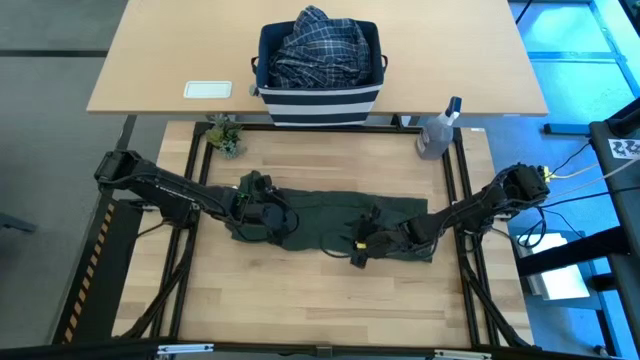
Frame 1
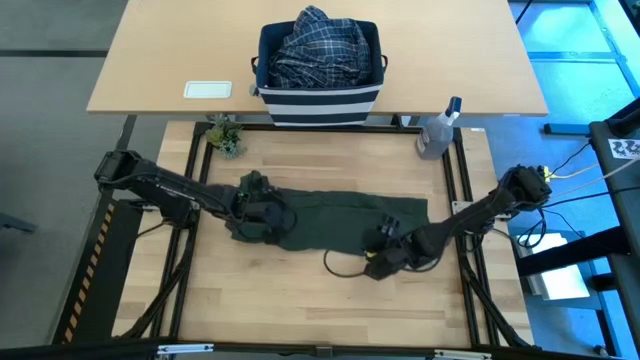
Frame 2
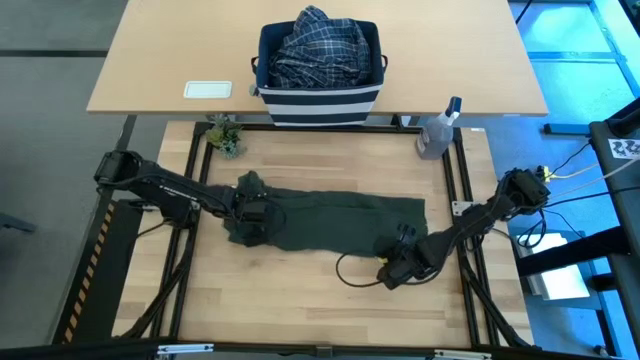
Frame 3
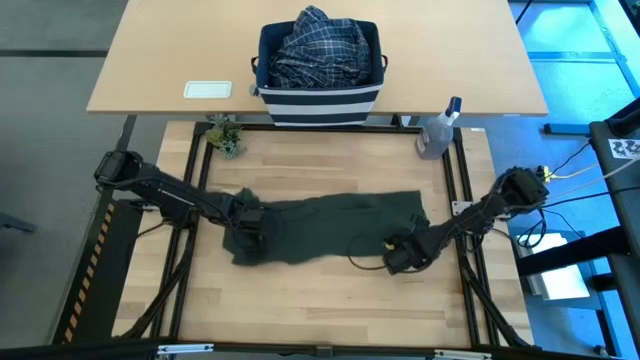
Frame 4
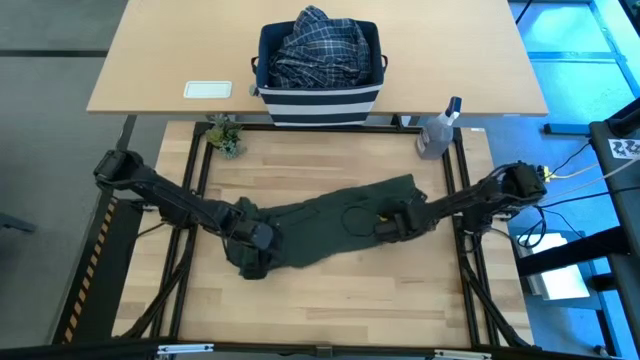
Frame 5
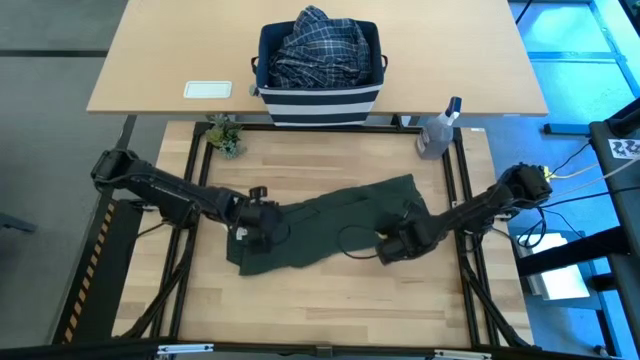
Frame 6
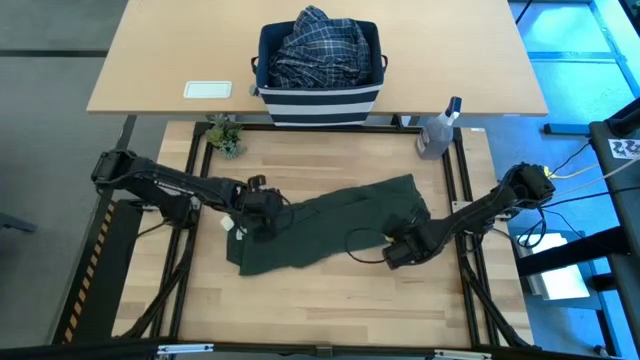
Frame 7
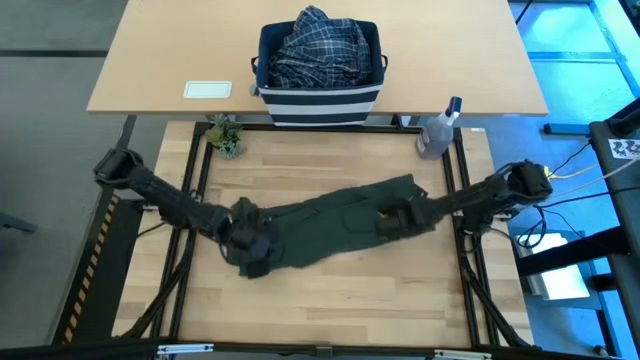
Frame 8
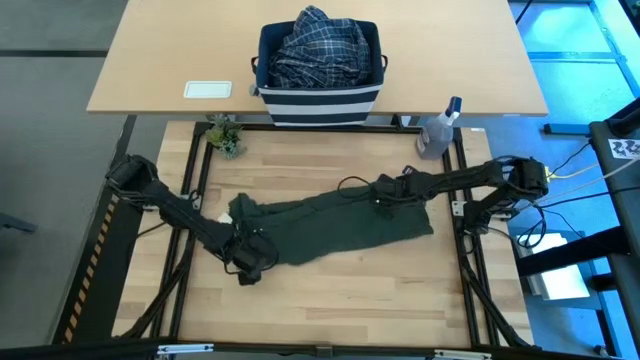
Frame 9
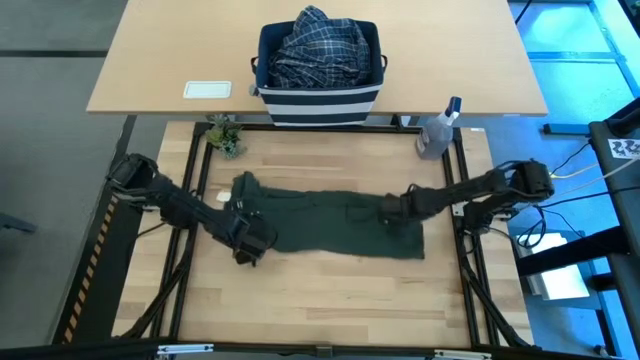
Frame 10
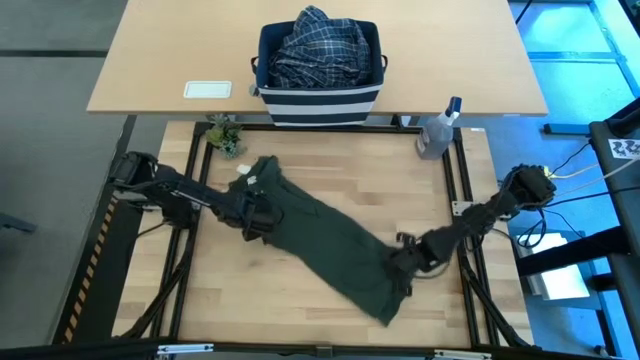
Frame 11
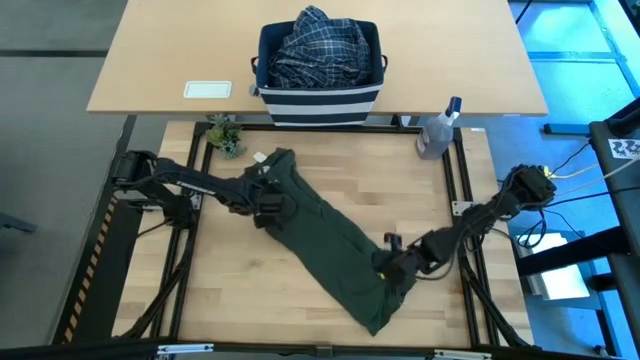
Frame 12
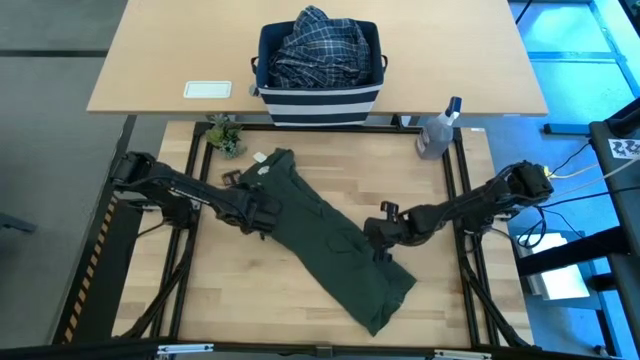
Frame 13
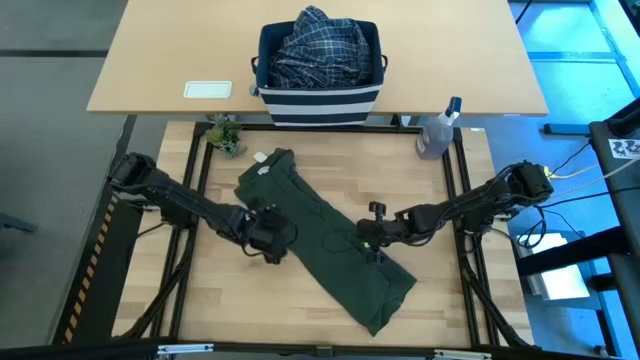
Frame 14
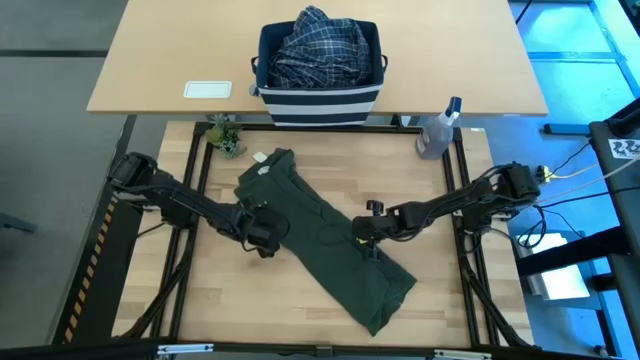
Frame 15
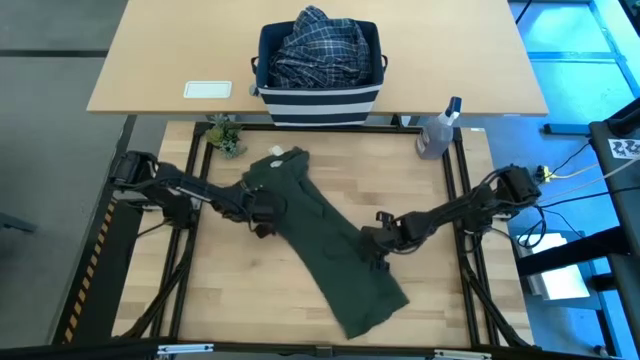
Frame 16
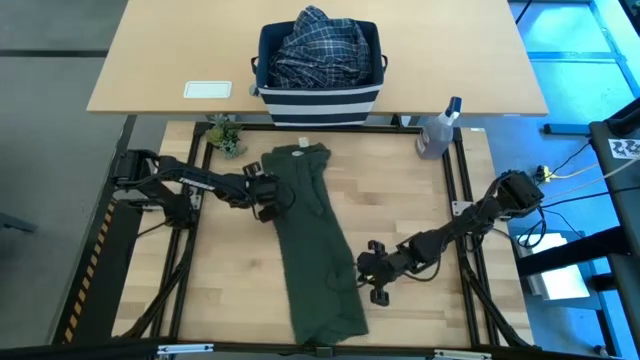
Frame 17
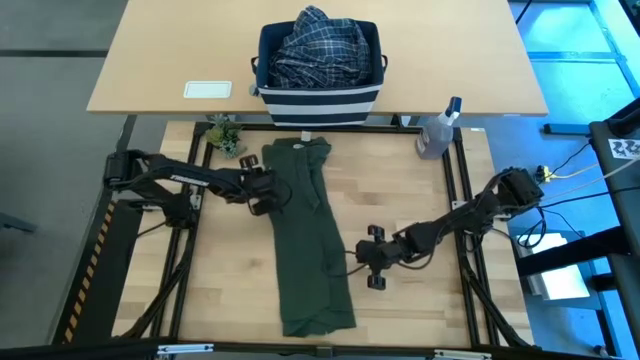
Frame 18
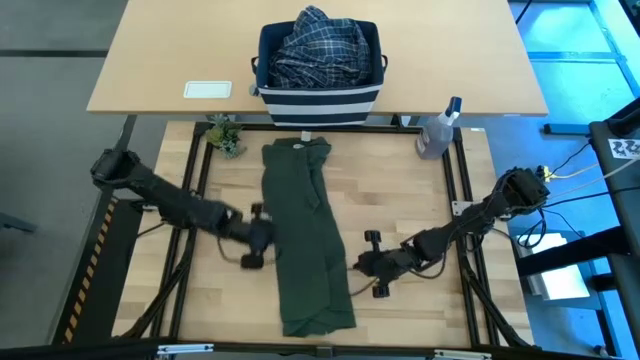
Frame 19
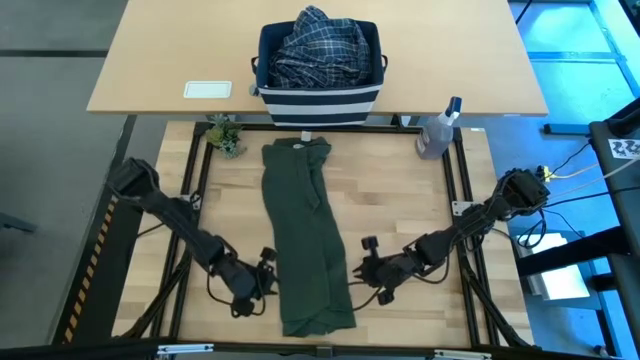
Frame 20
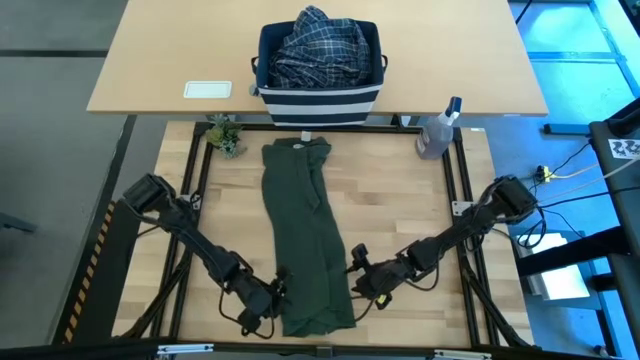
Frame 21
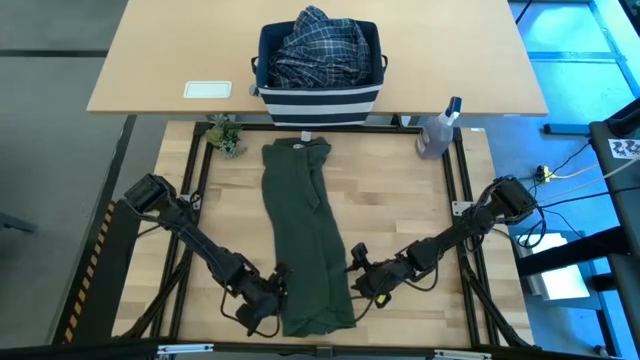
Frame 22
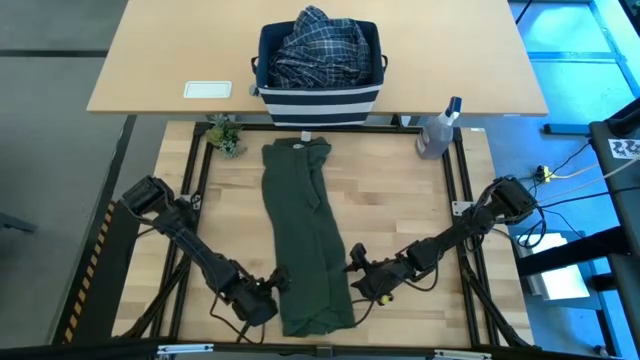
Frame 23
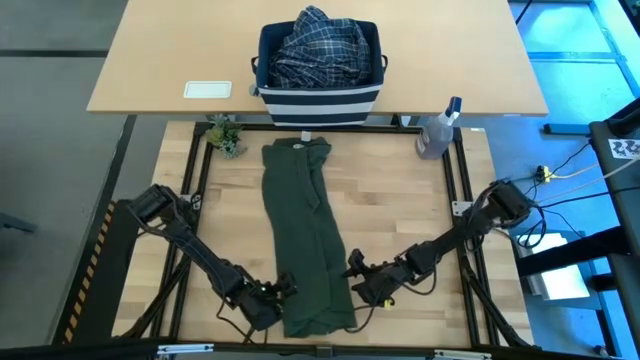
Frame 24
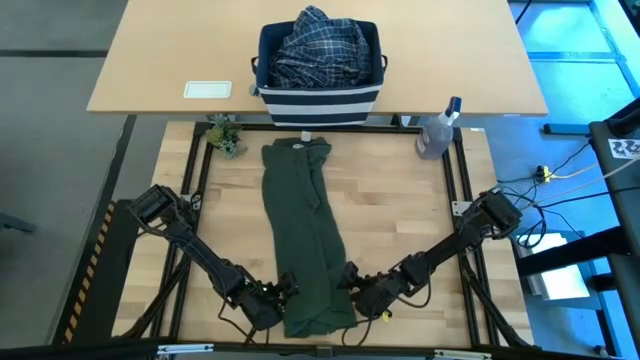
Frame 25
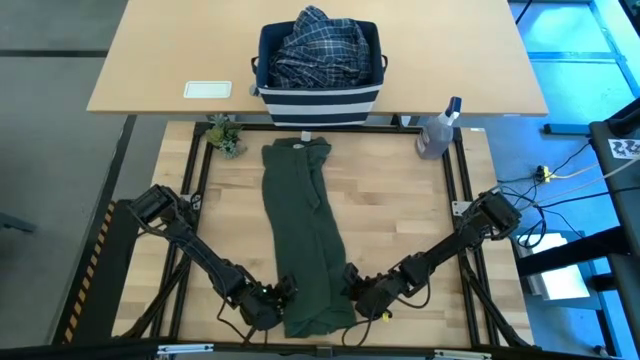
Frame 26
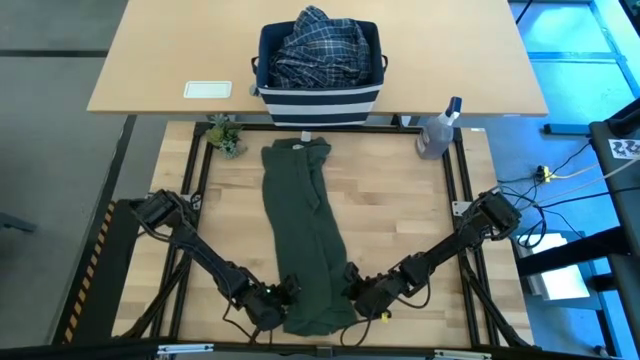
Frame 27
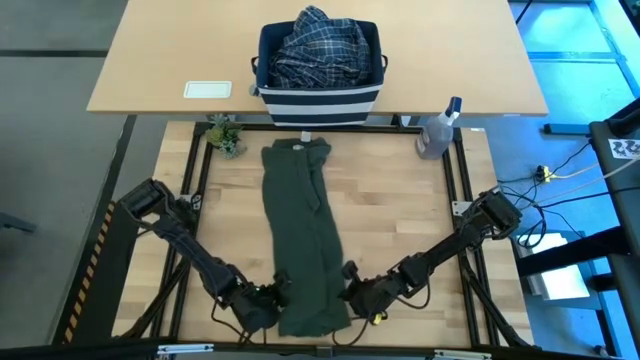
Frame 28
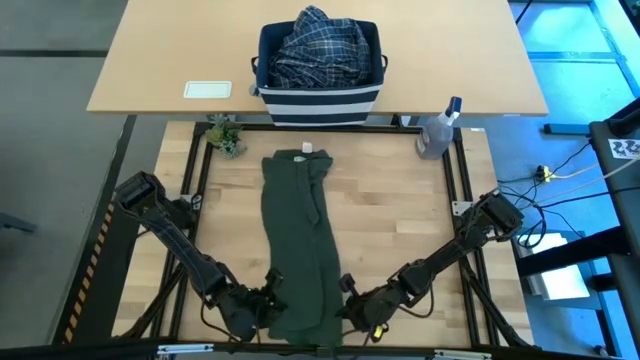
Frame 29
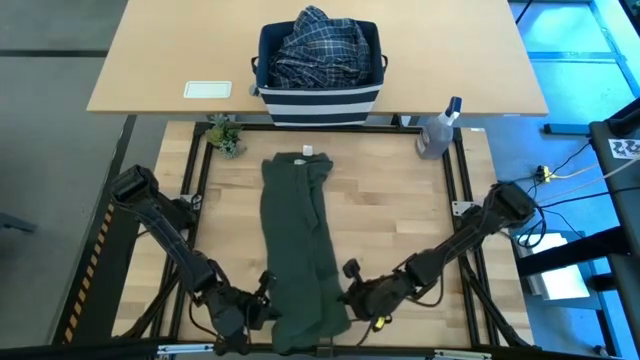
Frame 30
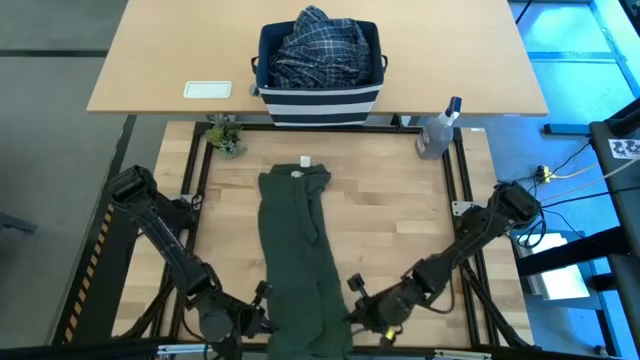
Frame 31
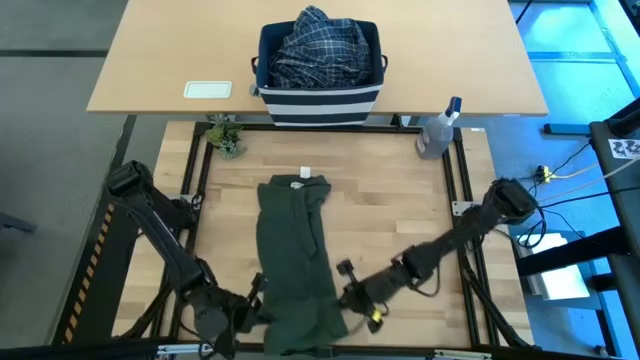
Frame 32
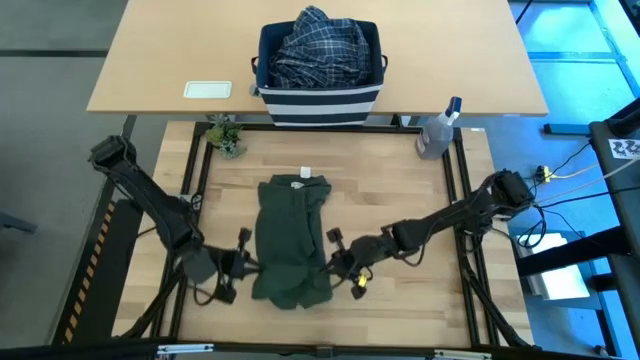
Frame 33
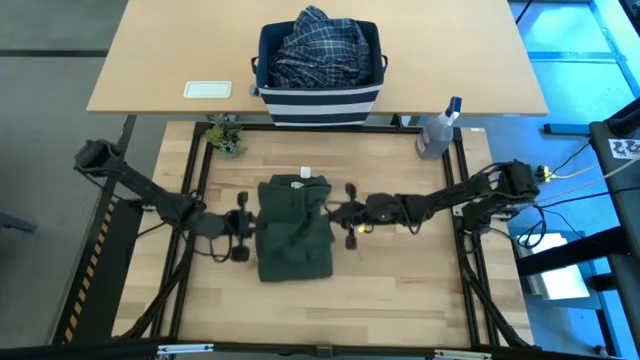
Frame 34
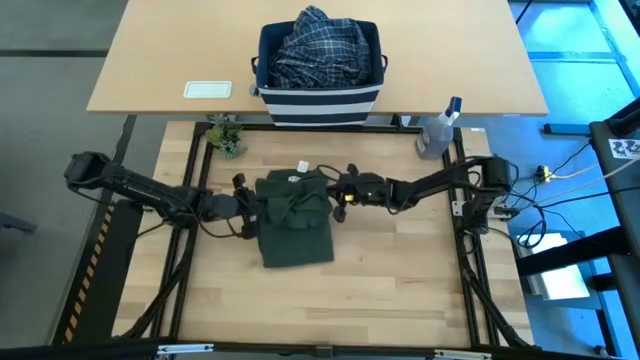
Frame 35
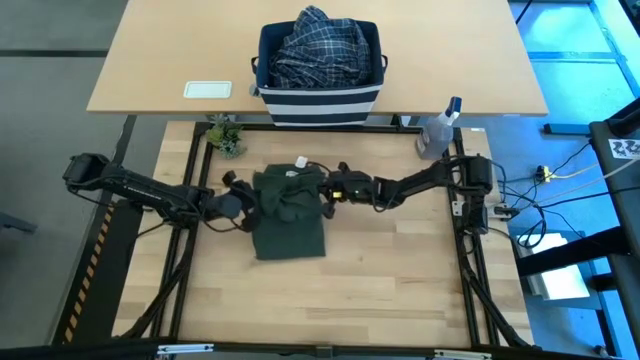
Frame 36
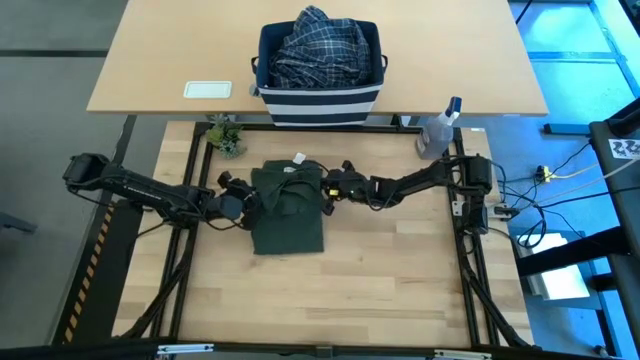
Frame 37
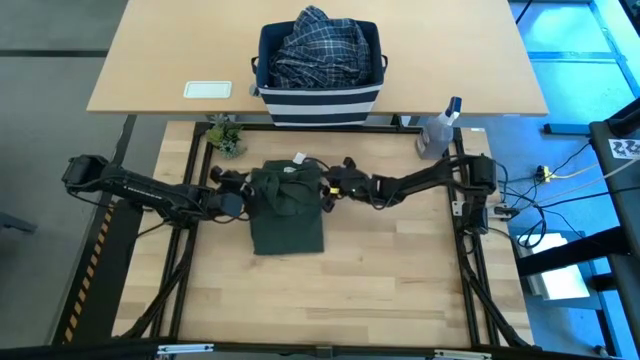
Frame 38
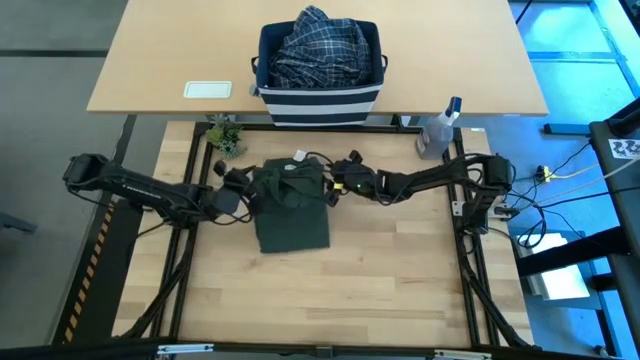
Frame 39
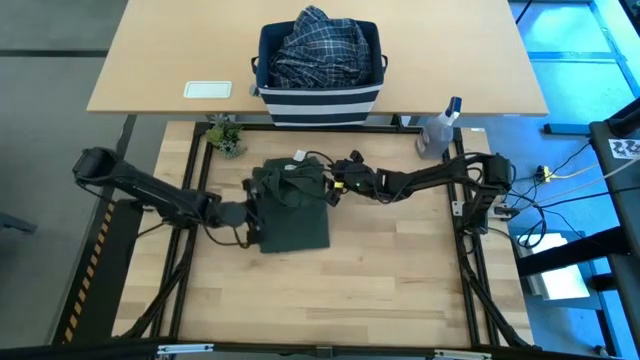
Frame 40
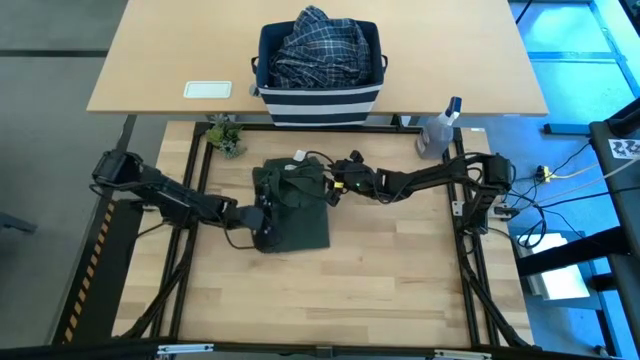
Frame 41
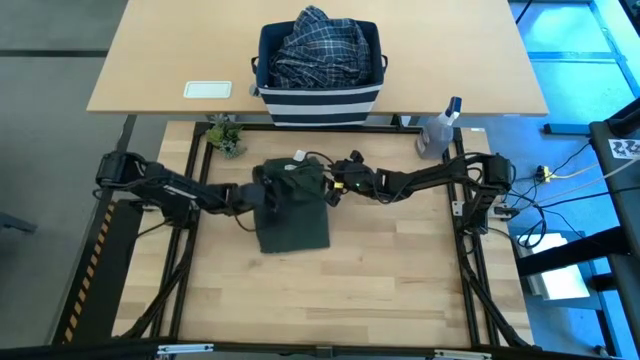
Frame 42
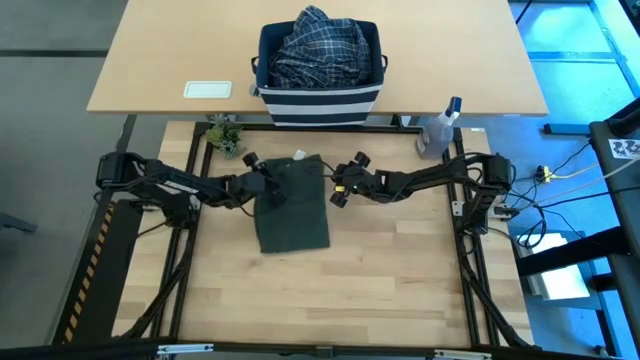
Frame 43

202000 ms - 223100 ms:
Task: Fold Laundry from Bin
Fold the green polo shirt
